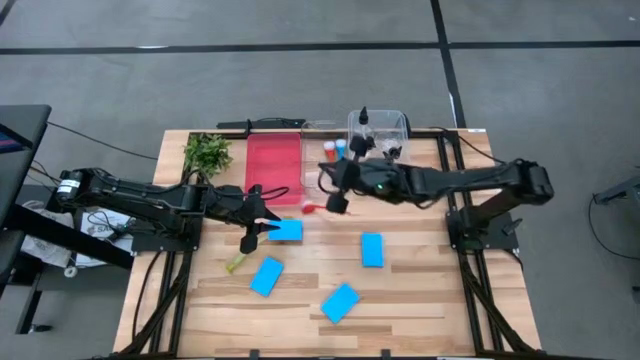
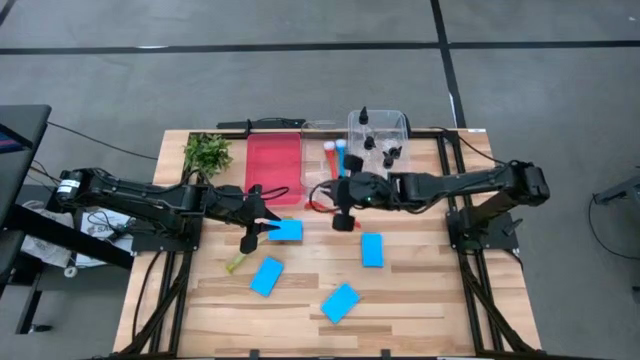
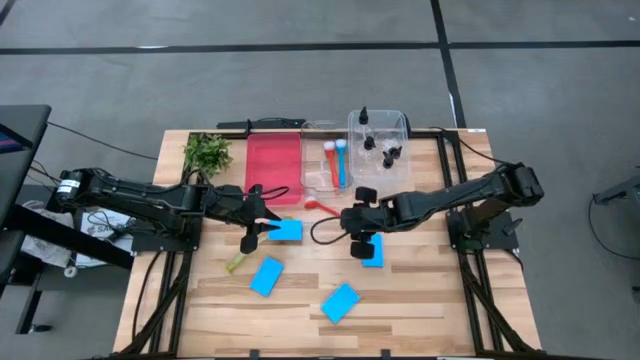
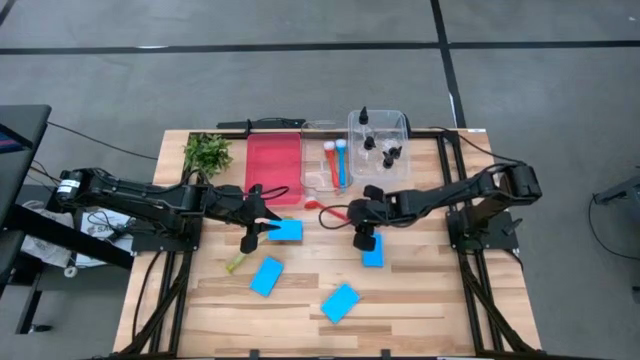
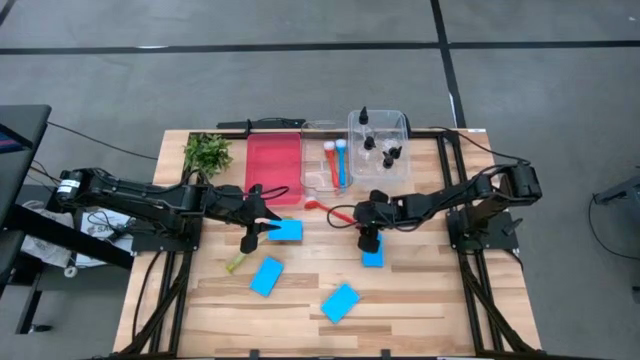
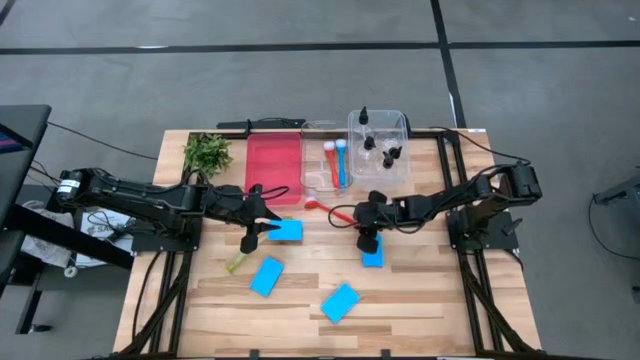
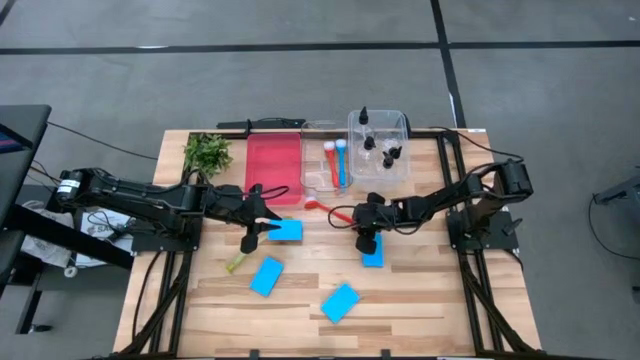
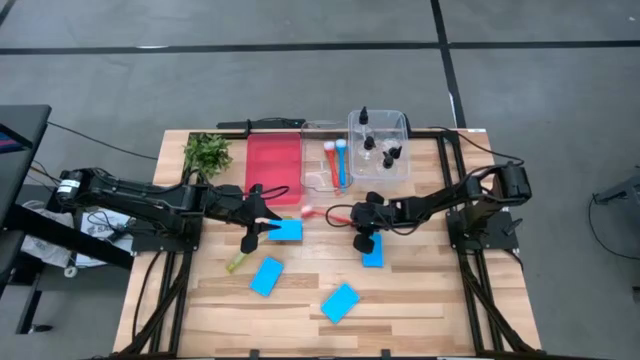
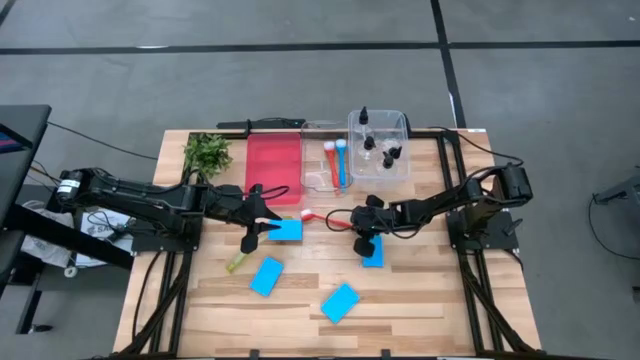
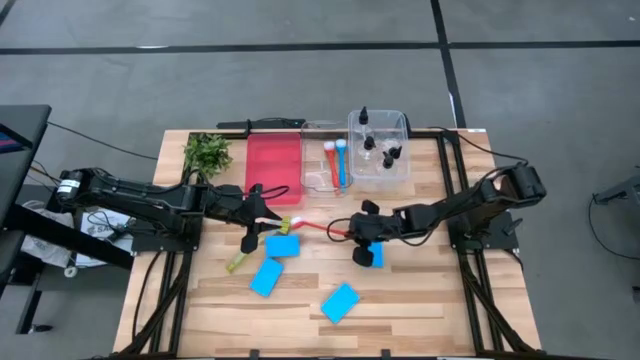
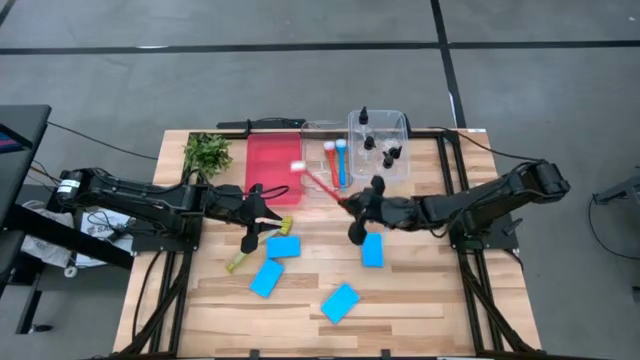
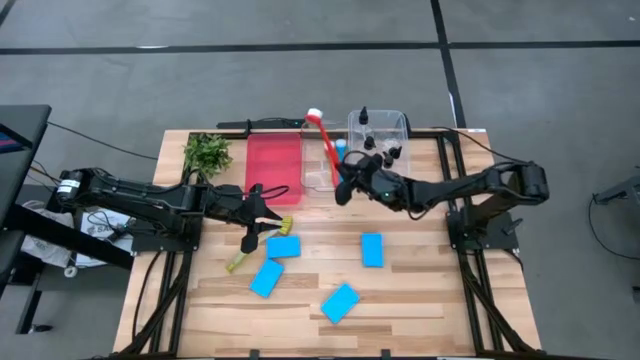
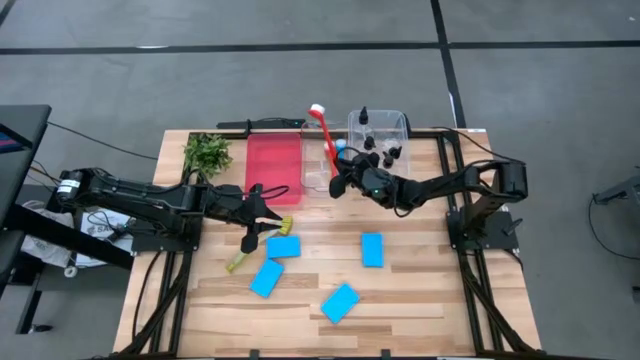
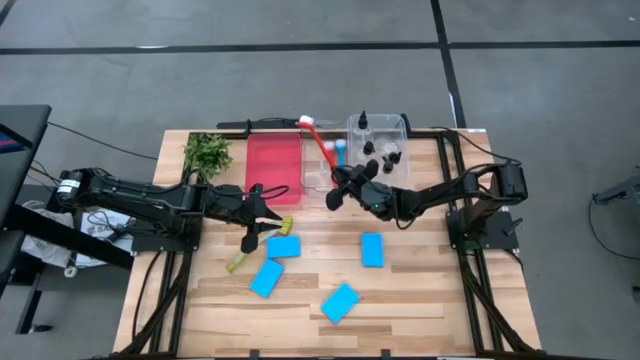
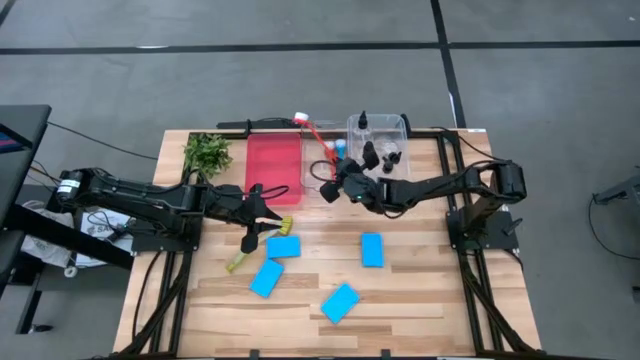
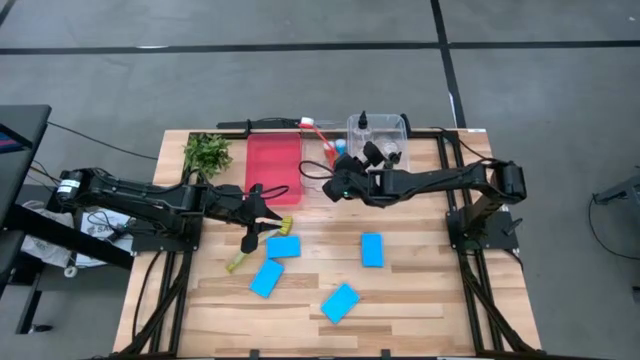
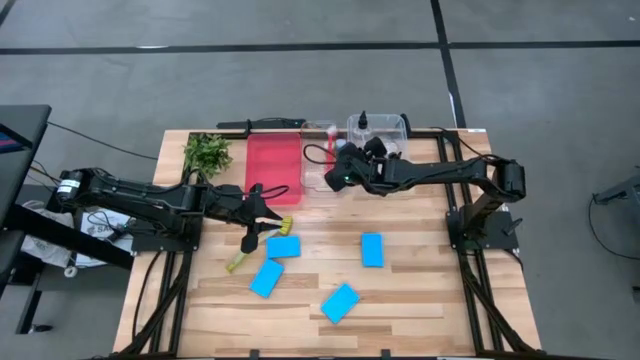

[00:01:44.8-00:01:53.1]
Task: Pick & Place Kitchen Sink Supplies
Put the orange dish brush into the left transparent bin

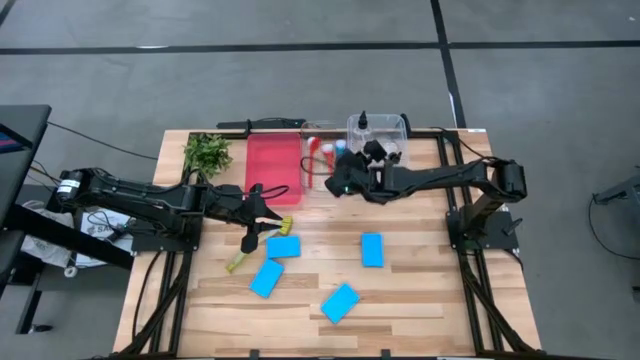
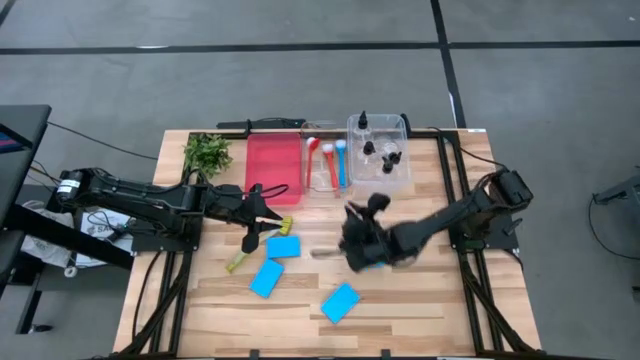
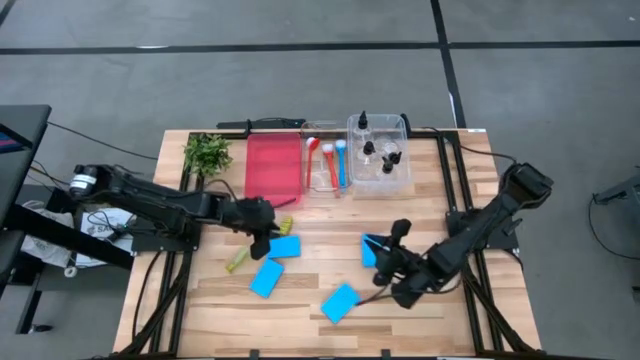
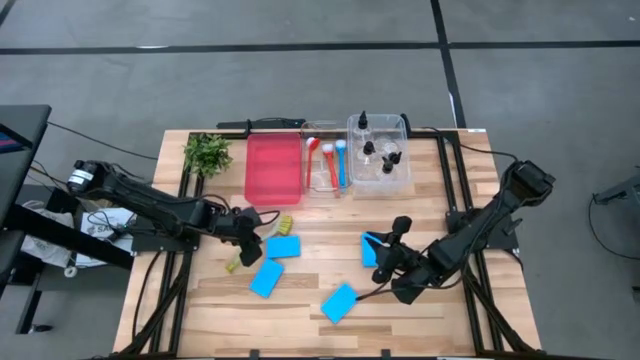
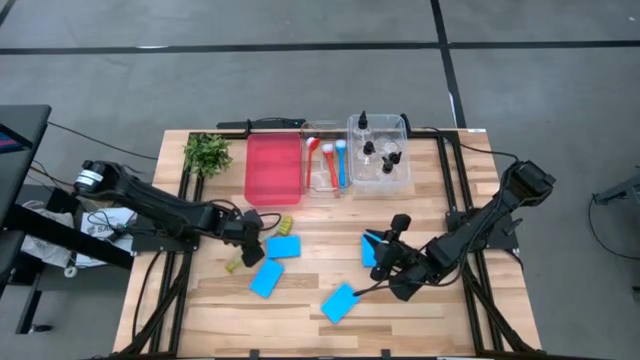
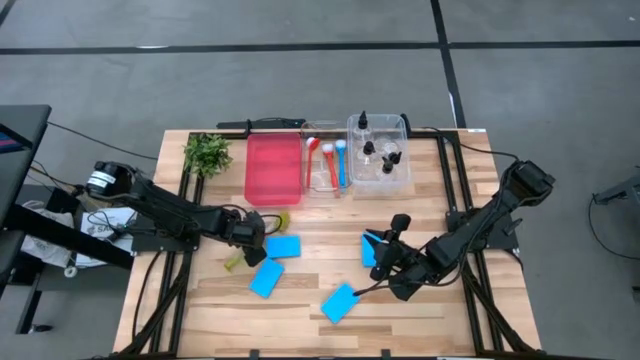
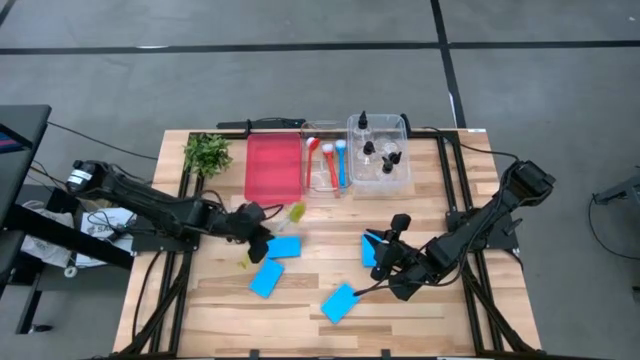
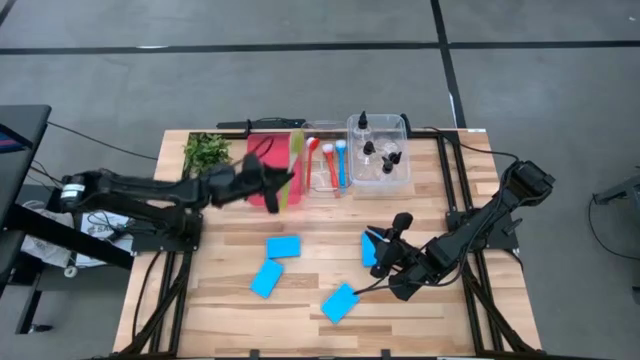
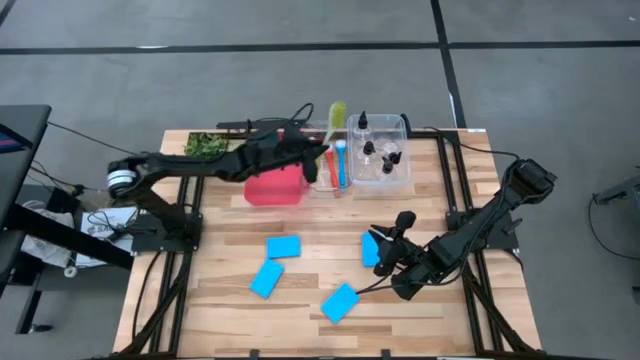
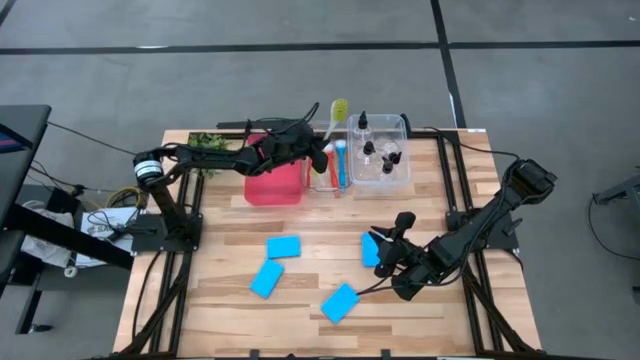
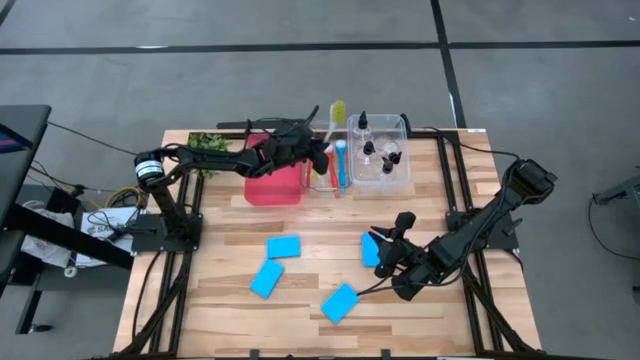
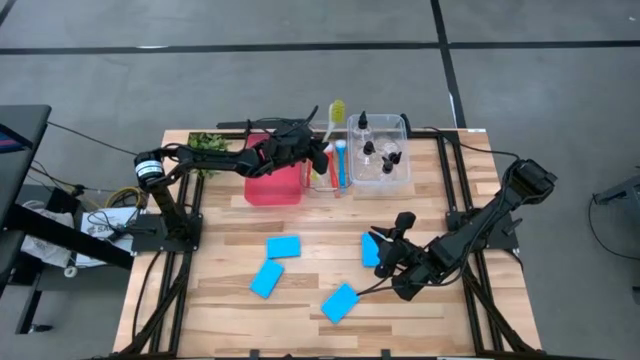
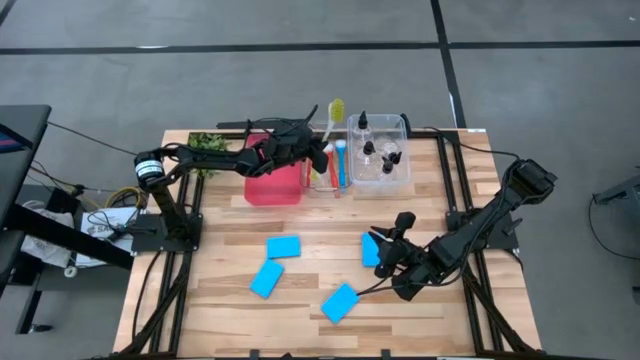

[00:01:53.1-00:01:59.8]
Put the green dish brush into the left transparent bin

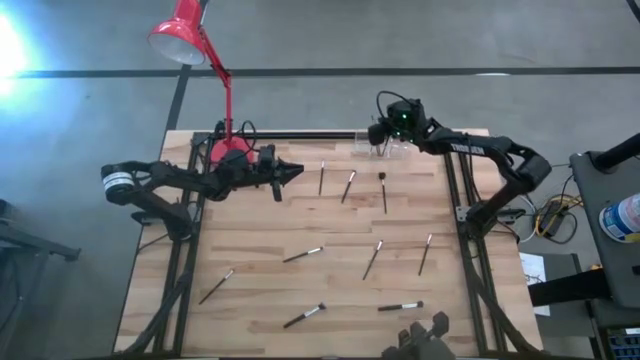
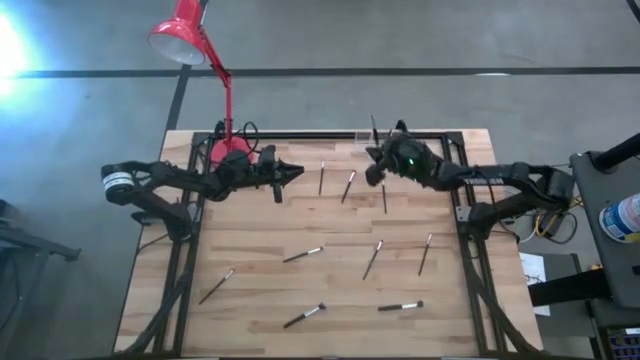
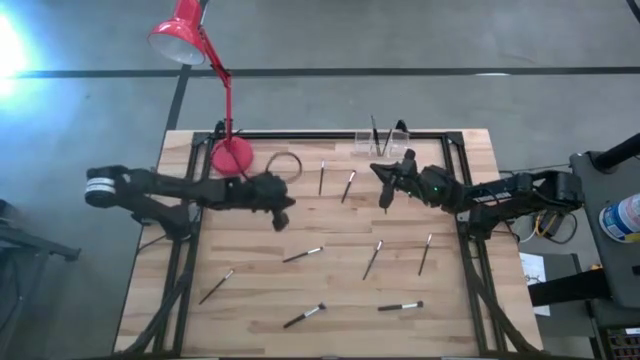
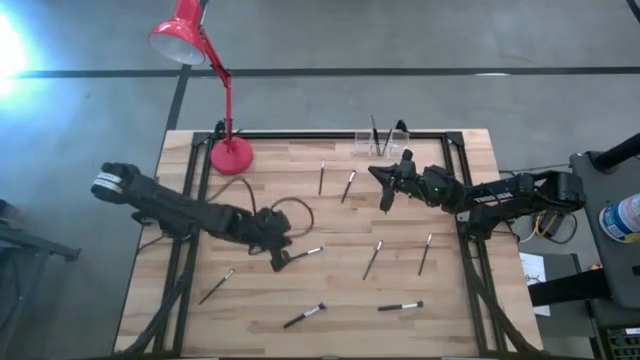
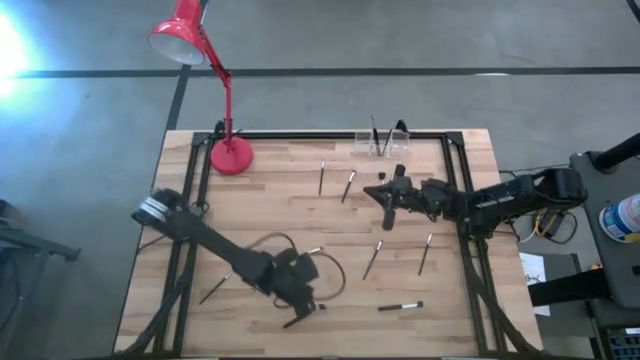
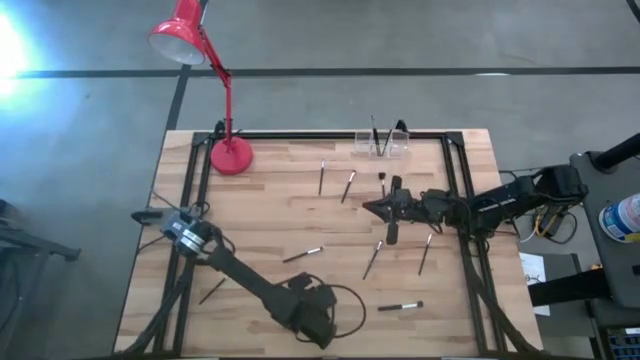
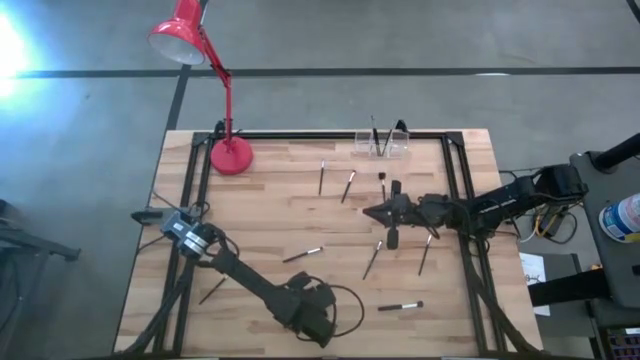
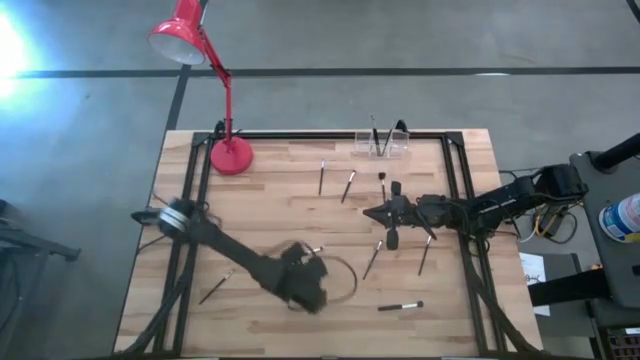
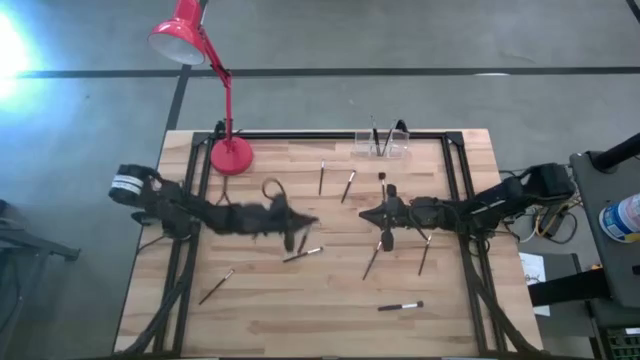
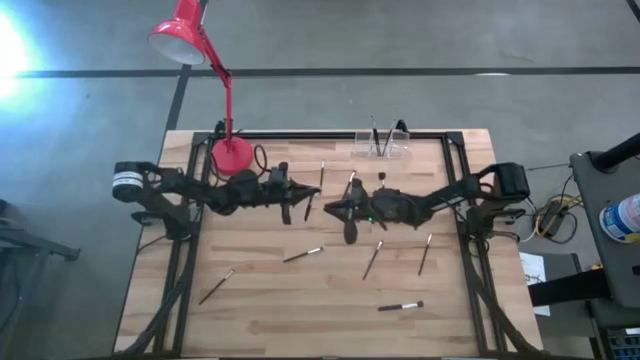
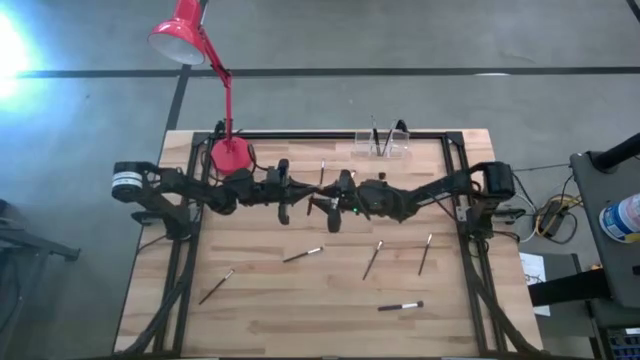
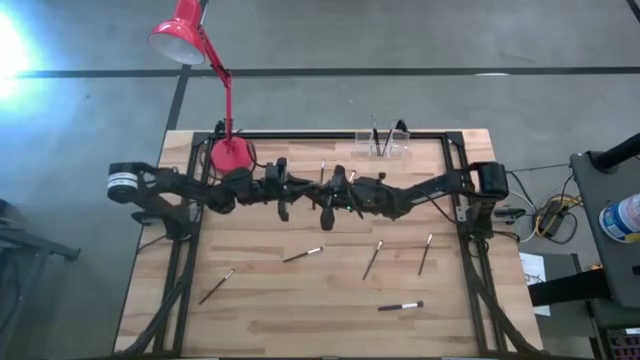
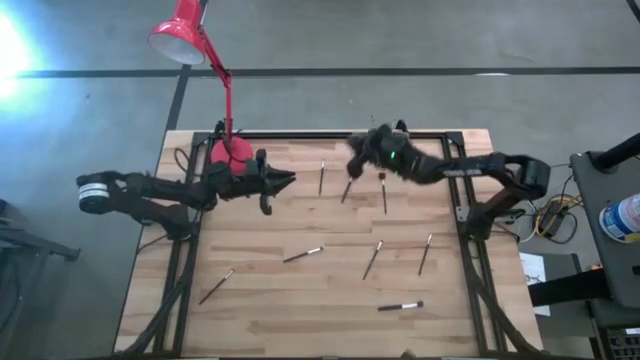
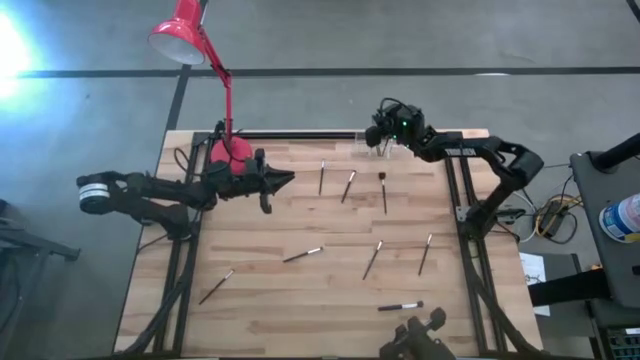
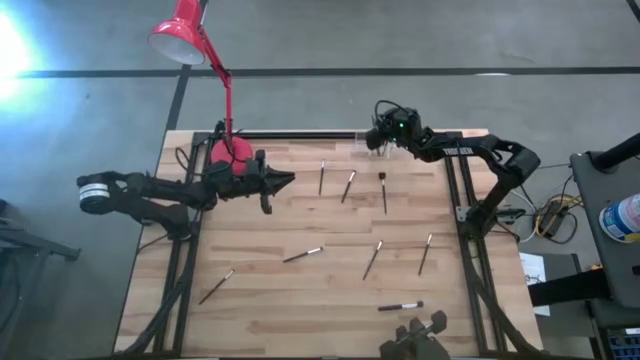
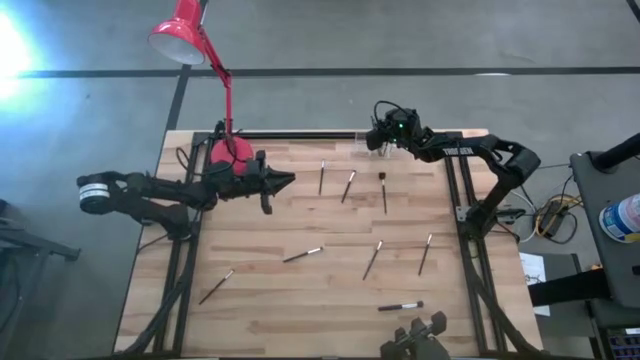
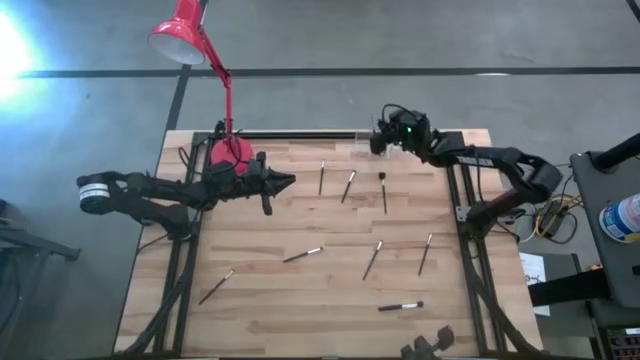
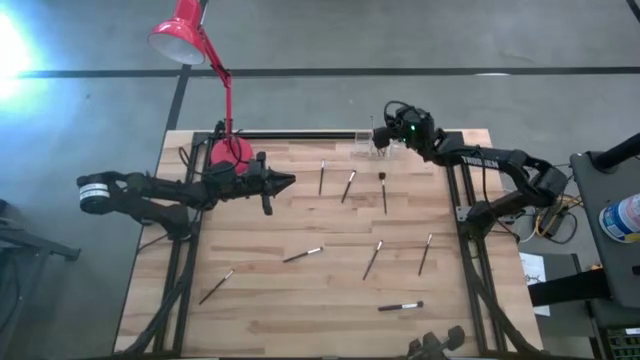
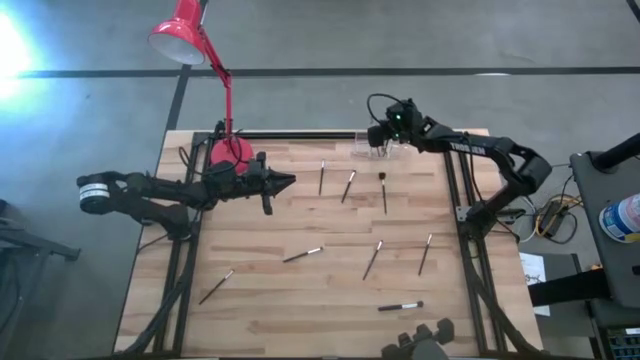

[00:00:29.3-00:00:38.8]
Task: Put items in baskets/containers
Put the powder brush into the transparent organizer
